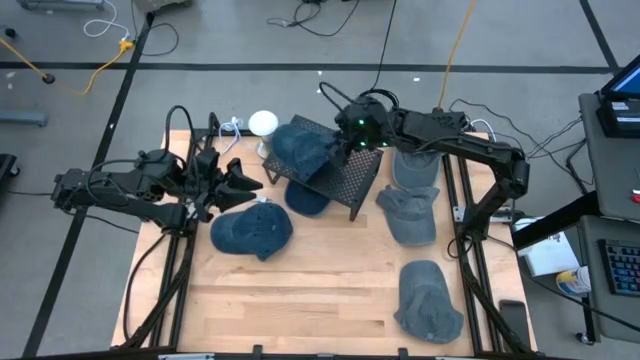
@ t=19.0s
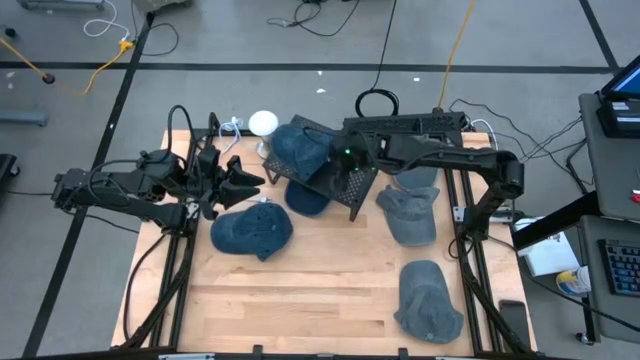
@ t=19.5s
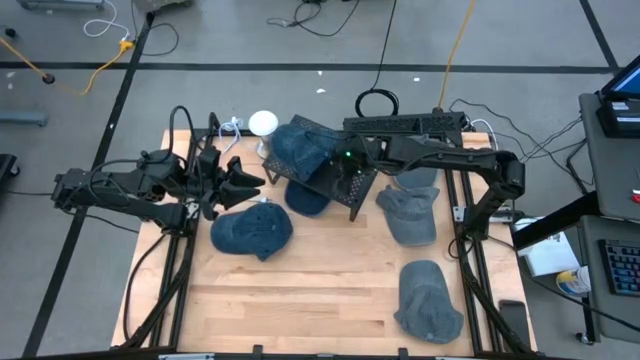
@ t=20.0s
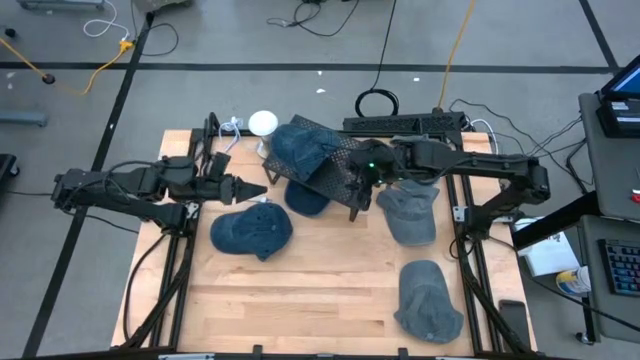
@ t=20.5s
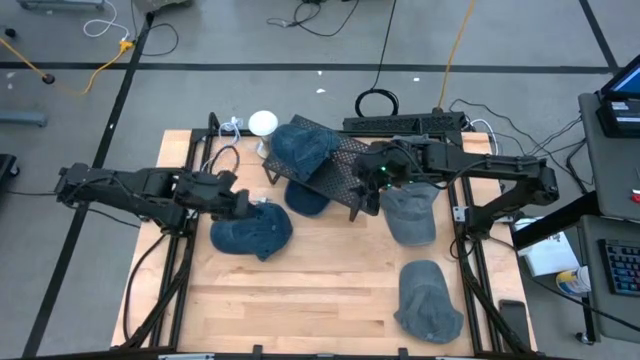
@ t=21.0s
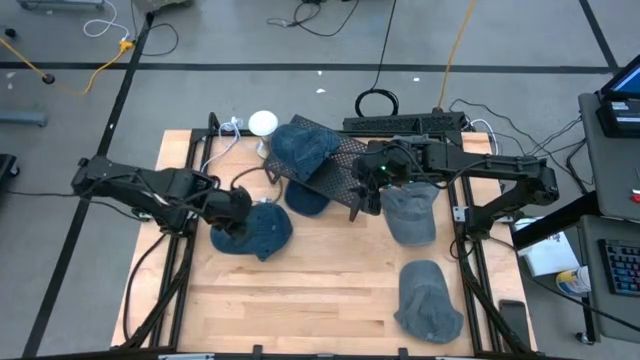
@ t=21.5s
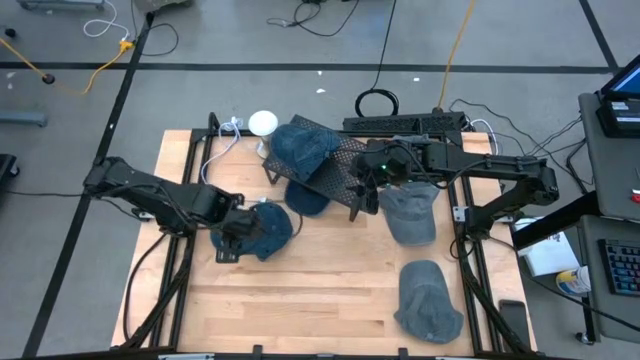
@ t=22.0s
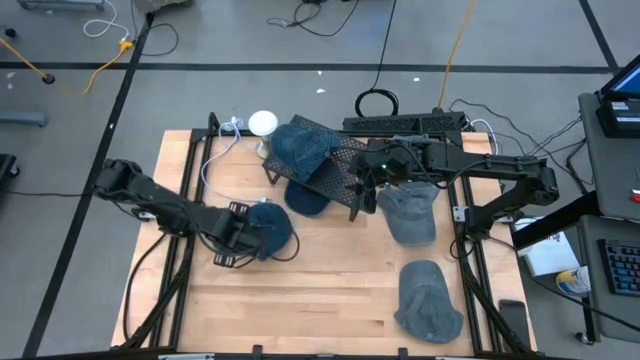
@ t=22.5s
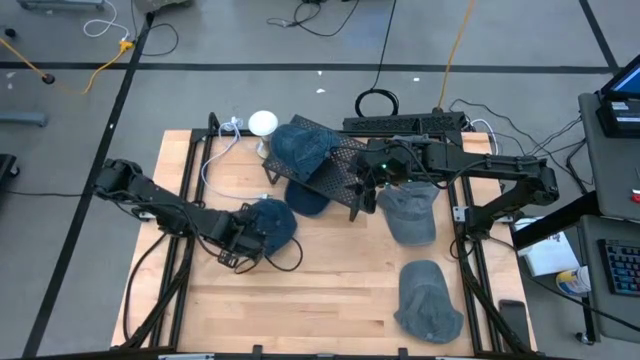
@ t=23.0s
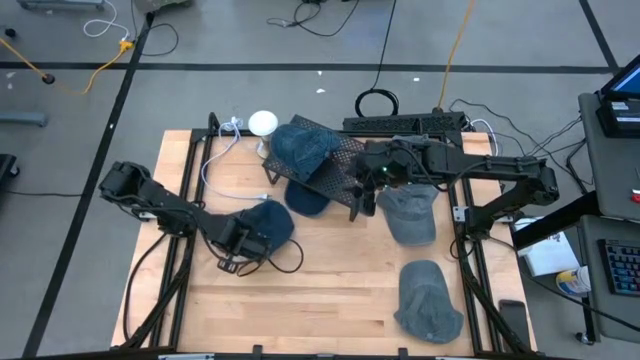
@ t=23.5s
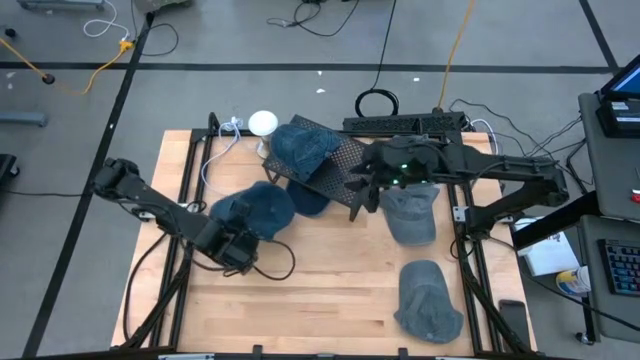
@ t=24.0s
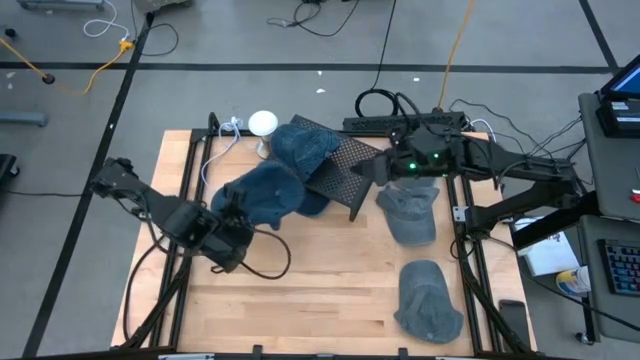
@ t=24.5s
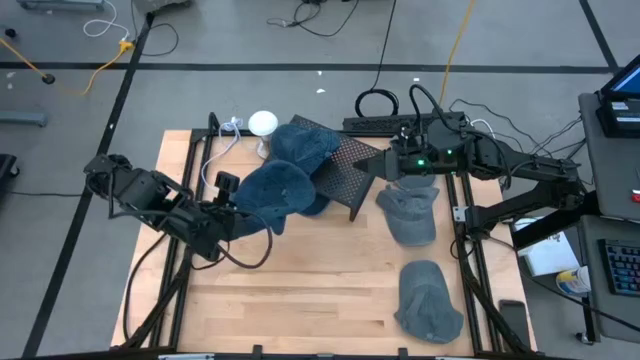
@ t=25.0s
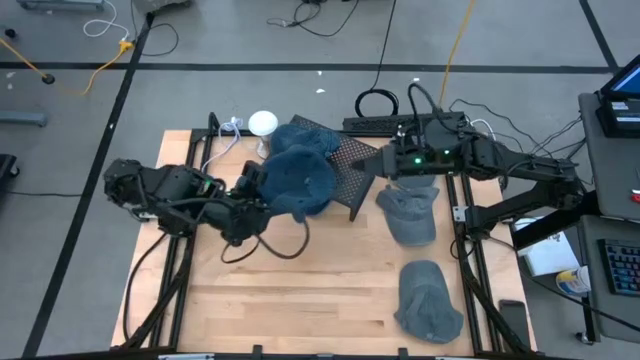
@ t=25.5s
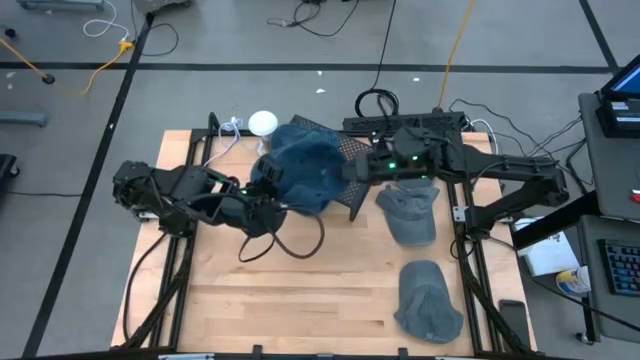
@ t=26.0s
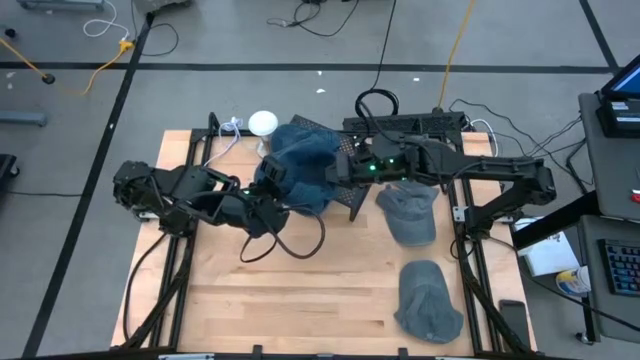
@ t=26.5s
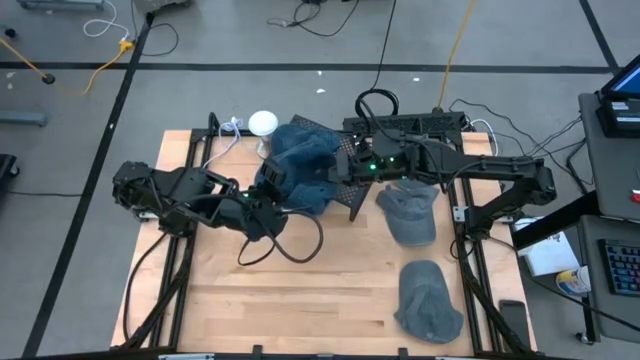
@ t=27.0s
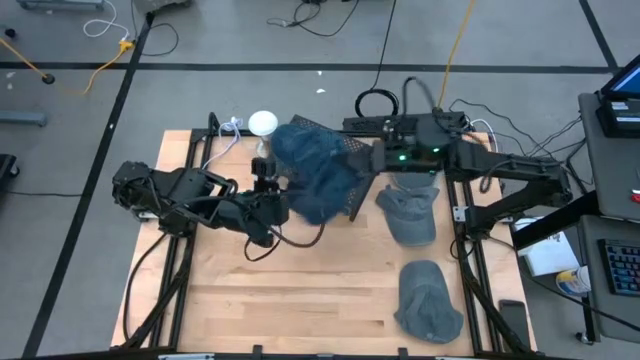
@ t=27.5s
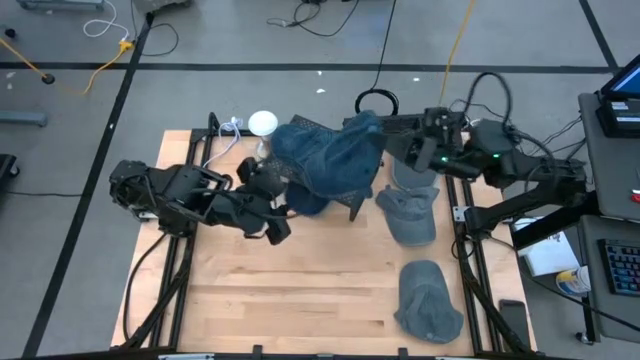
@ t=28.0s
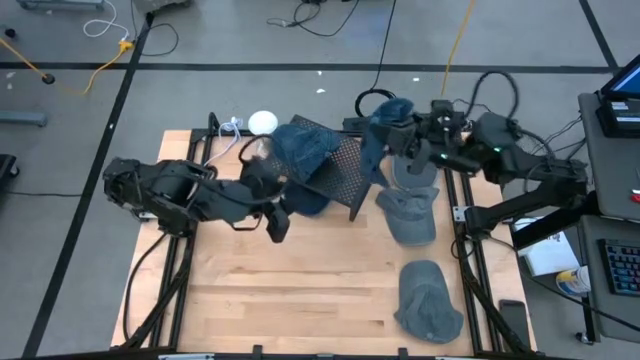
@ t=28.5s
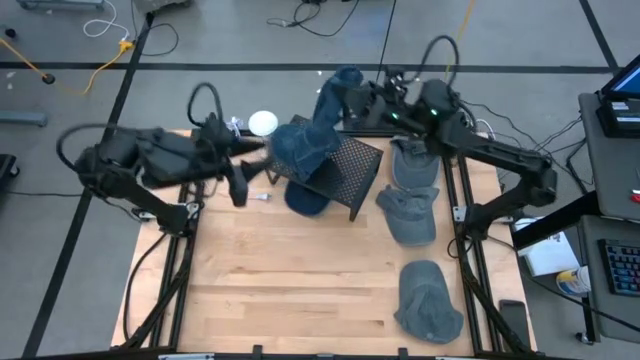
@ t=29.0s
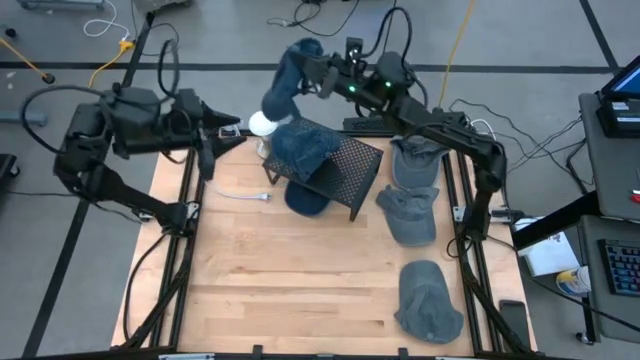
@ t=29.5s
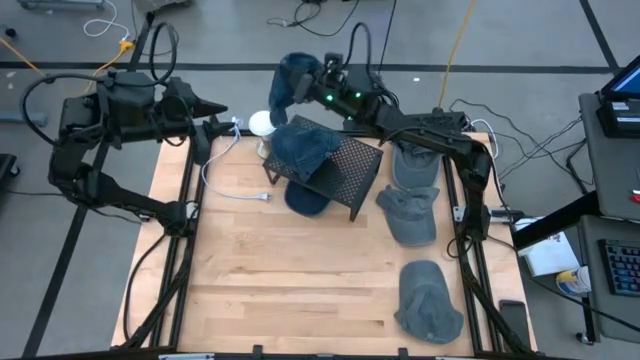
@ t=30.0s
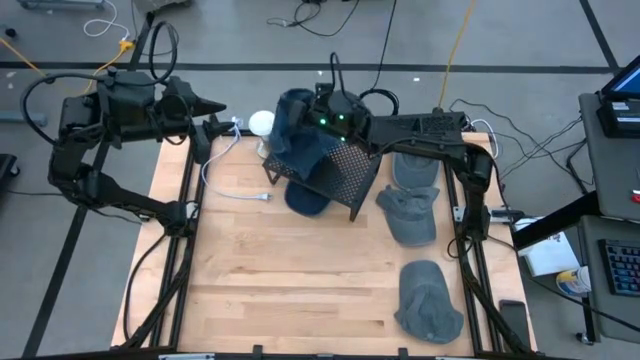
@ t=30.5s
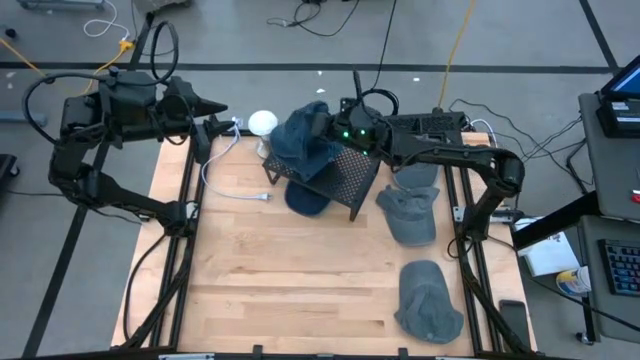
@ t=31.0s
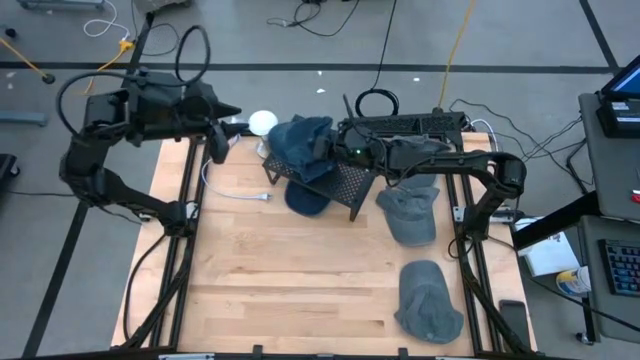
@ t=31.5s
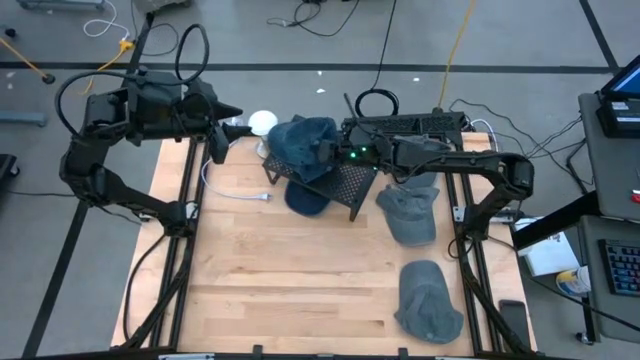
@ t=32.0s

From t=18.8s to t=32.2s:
Task: Pick & Place hat
Stack the bottom blue cap on the blue cap on the shelf

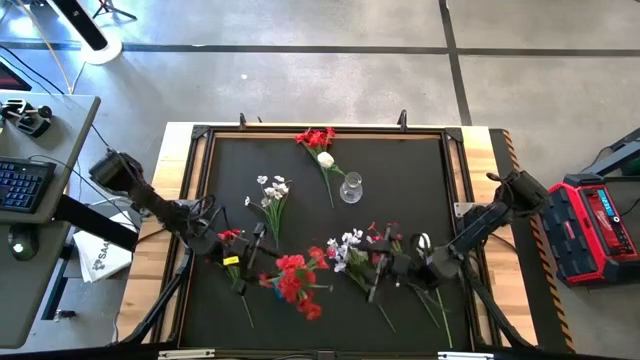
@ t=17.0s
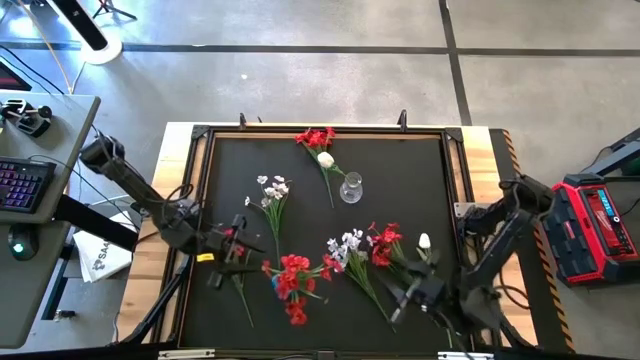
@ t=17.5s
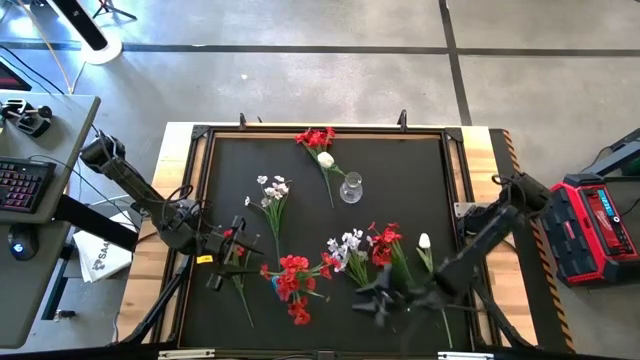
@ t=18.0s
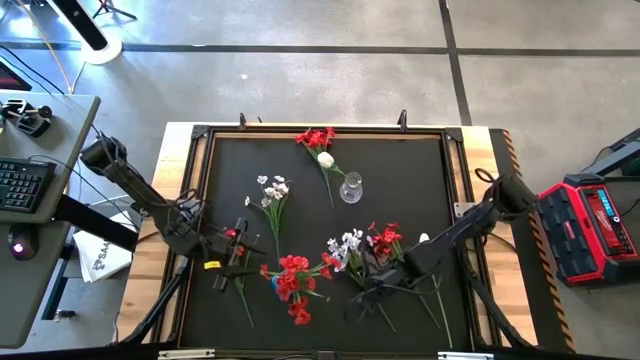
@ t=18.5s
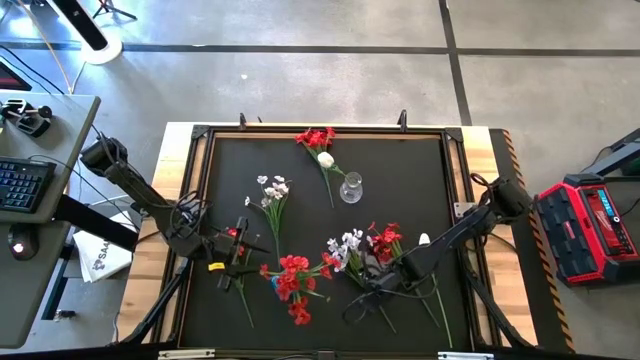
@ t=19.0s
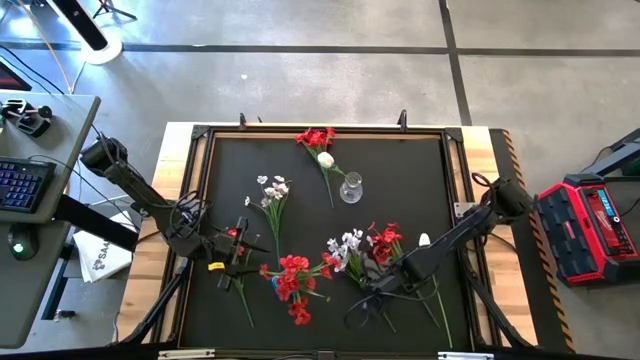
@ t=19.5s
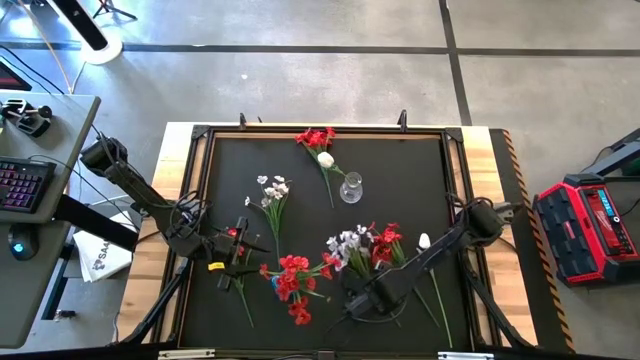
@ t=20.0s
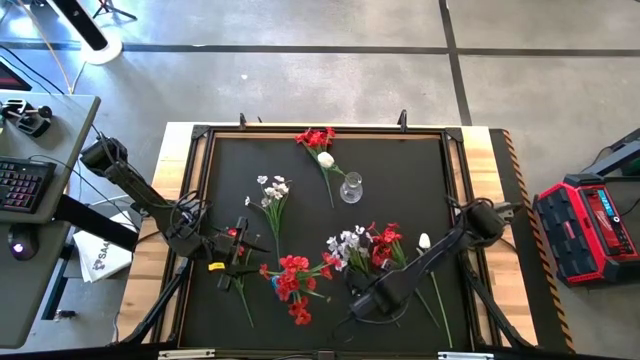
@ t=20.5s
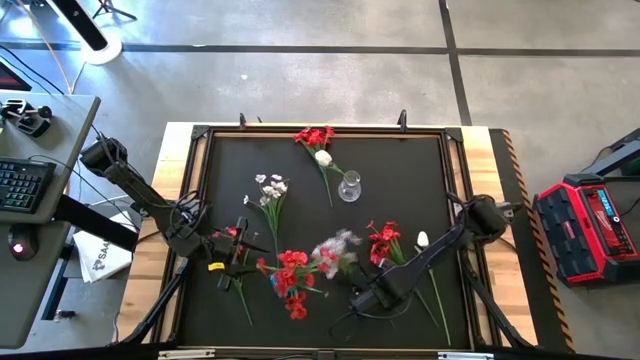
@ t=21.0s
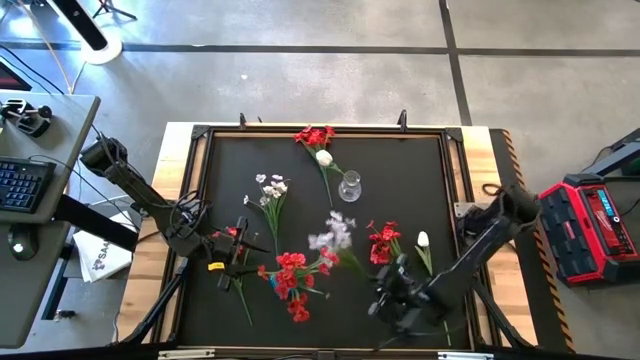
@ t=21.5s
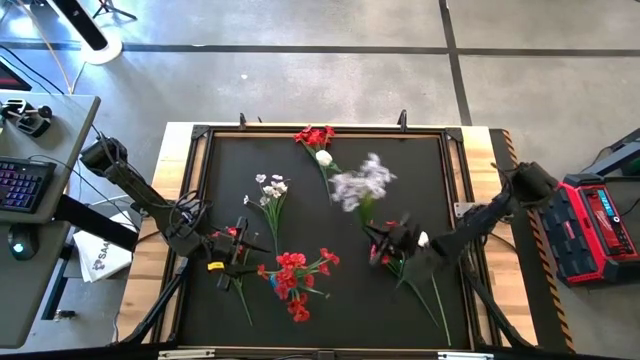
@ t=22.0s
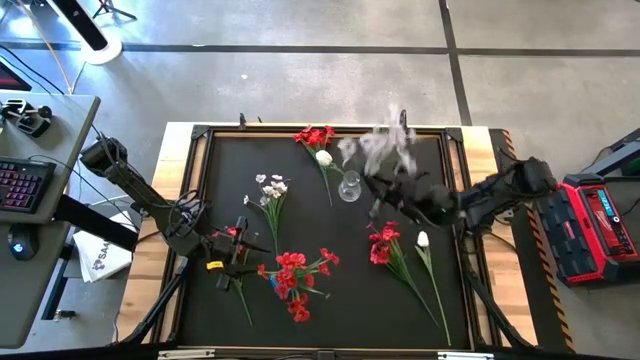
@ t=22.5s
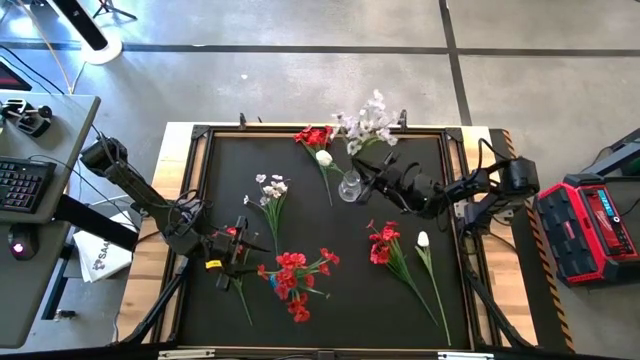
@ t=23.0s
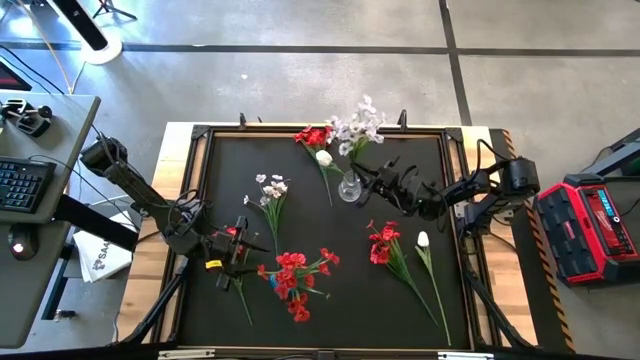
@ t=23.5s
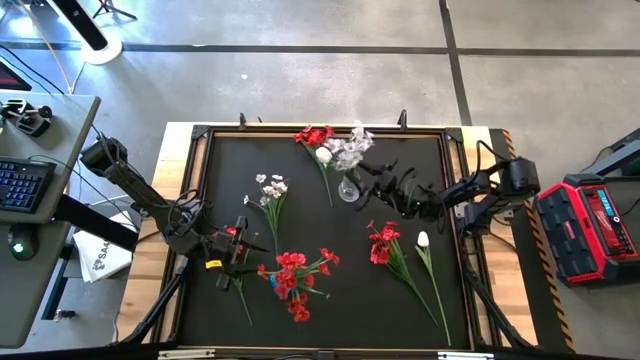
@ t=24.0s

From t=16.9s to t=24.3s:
Task: Sort flowers into vase by color
Put the white flowers into the transparent vase
